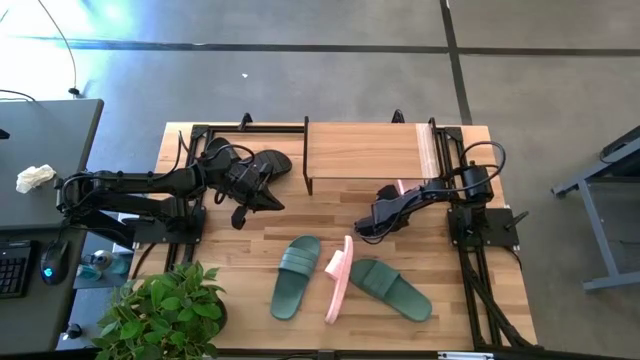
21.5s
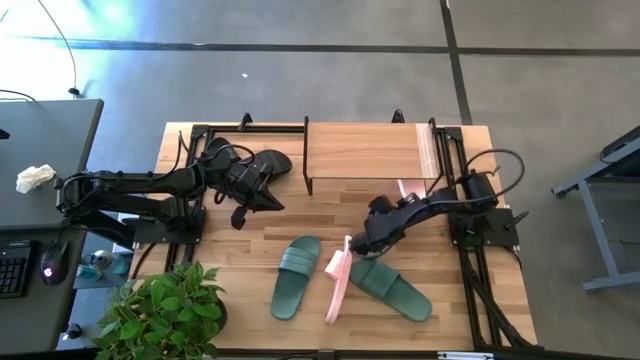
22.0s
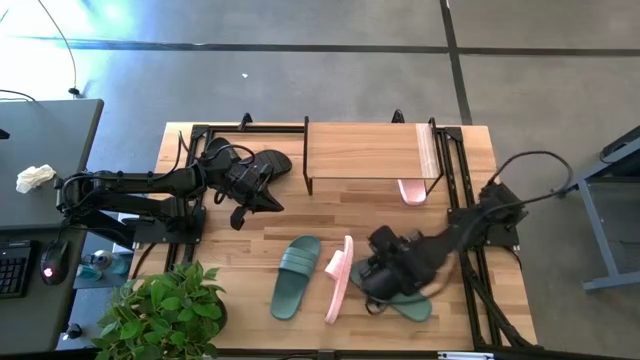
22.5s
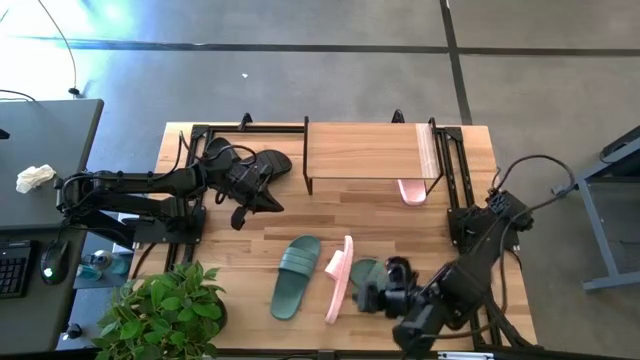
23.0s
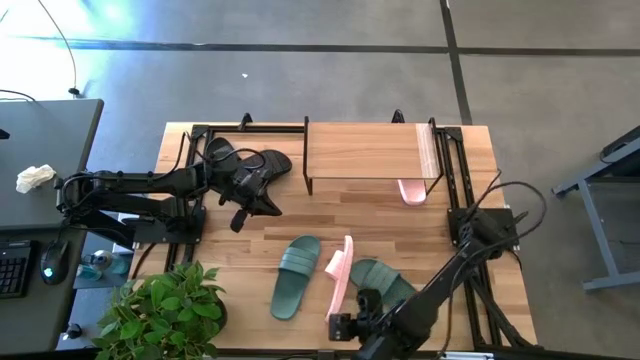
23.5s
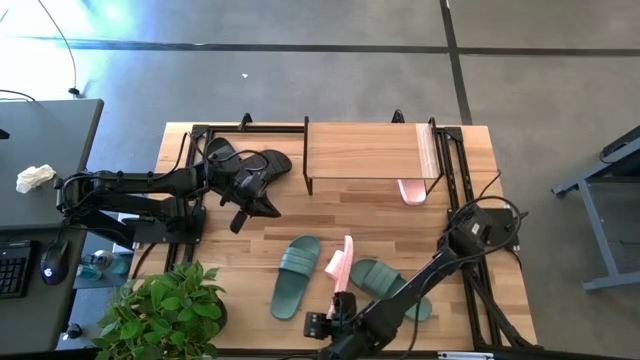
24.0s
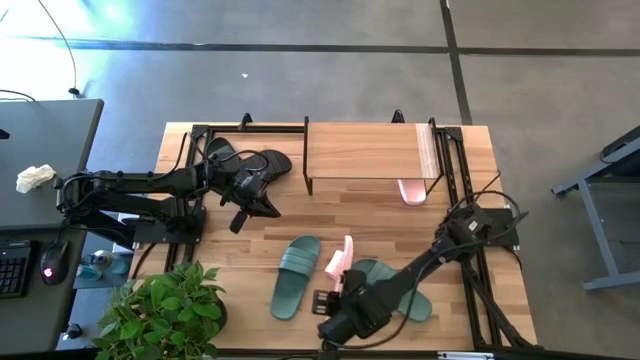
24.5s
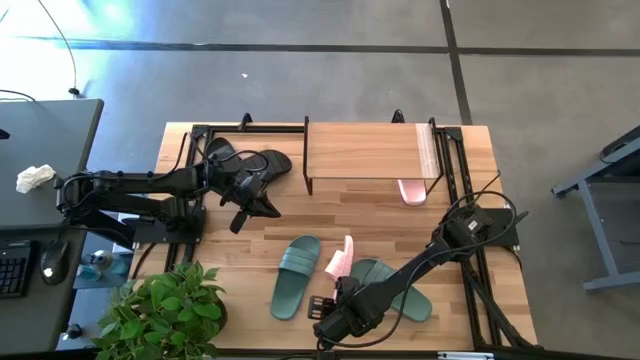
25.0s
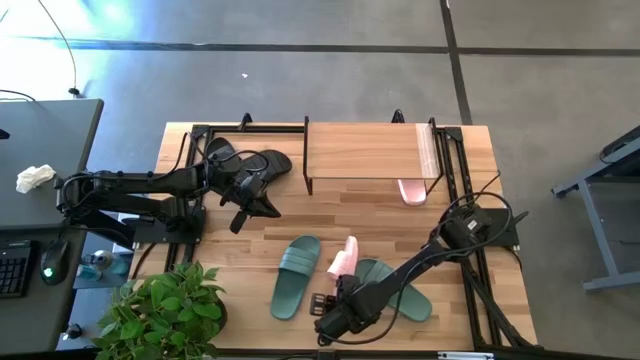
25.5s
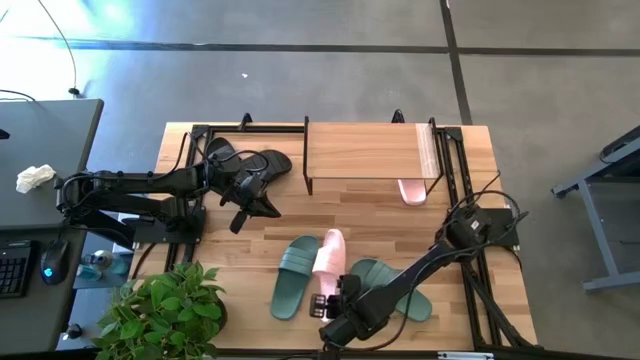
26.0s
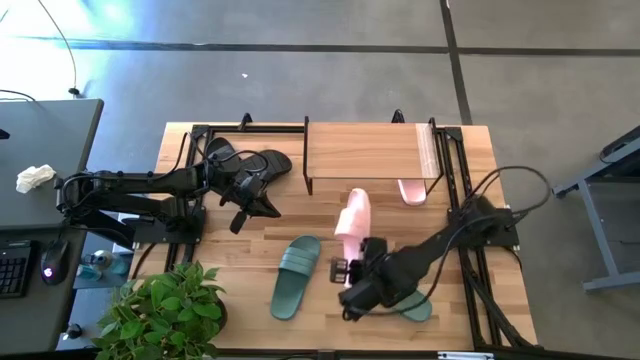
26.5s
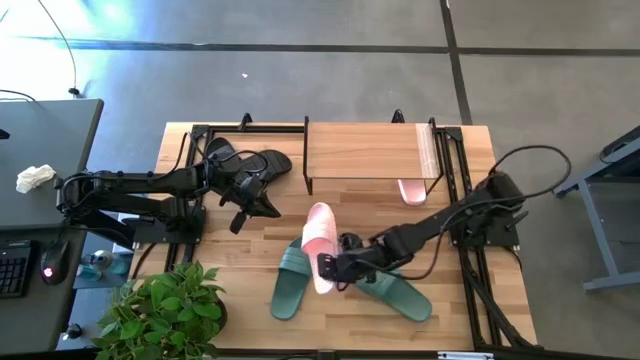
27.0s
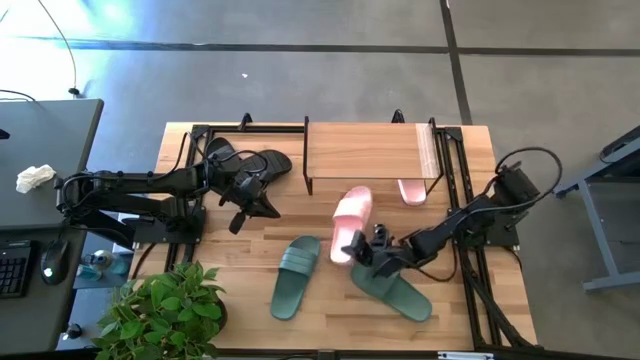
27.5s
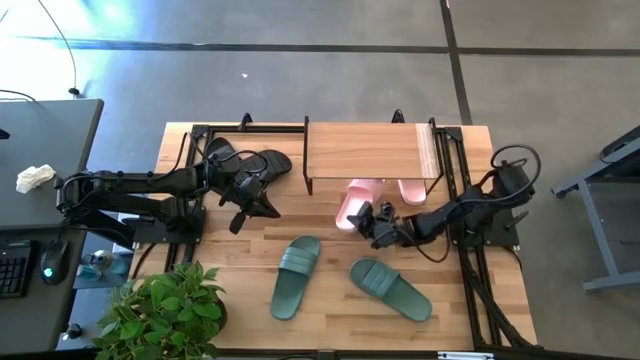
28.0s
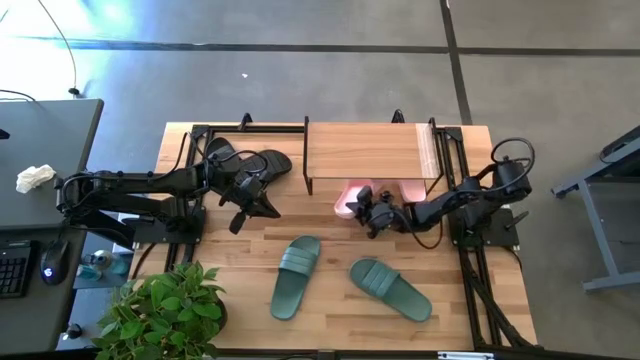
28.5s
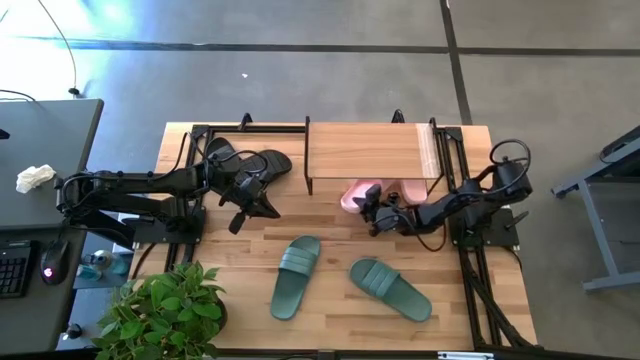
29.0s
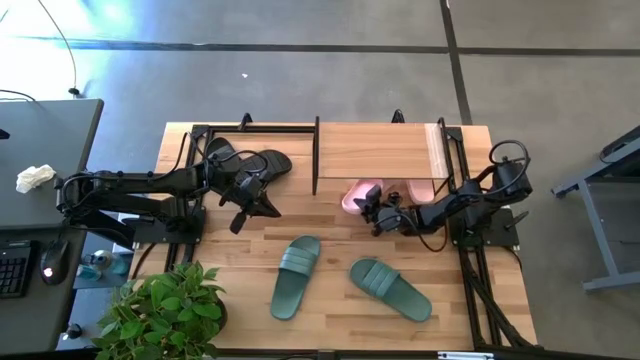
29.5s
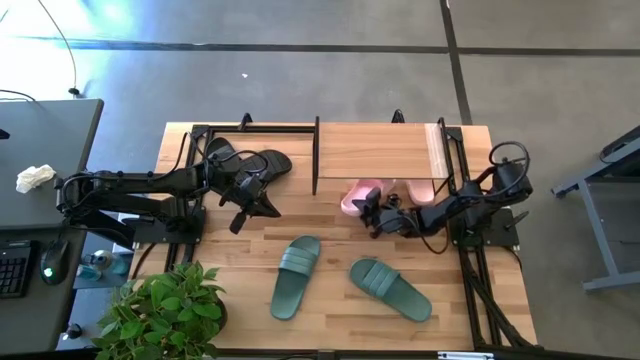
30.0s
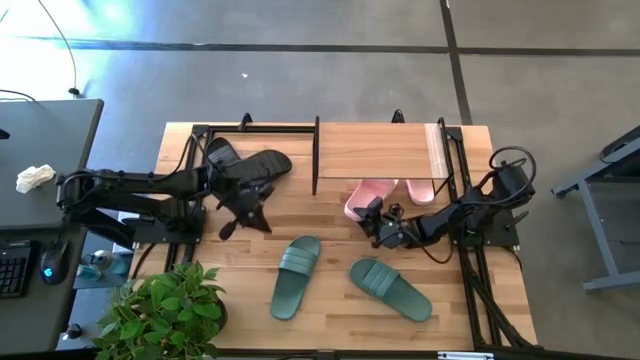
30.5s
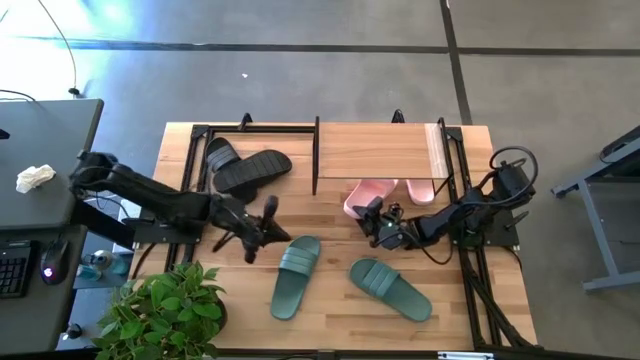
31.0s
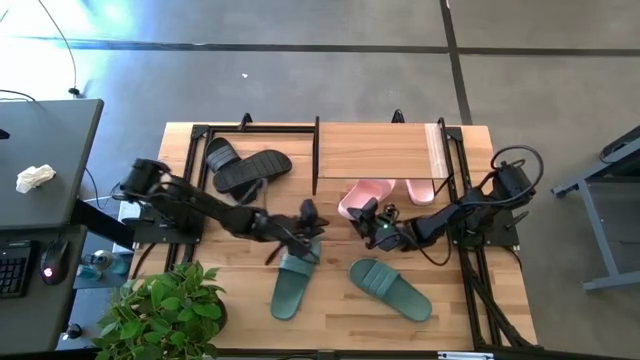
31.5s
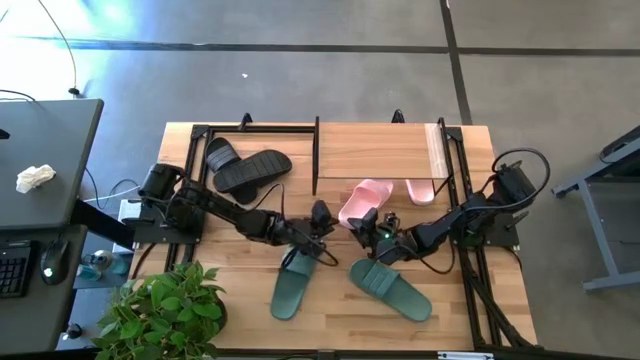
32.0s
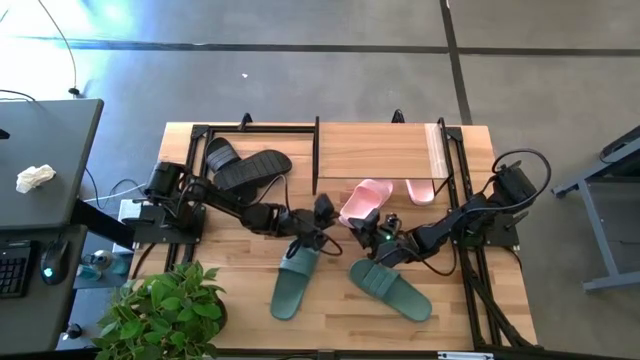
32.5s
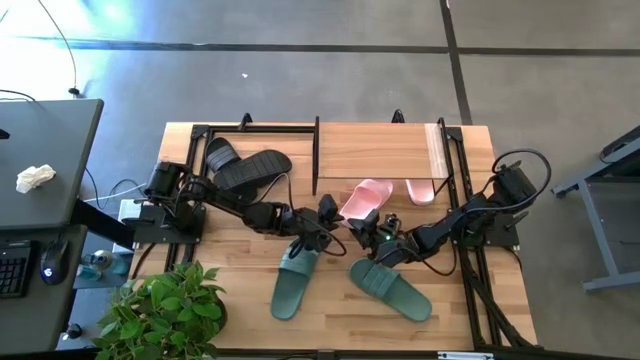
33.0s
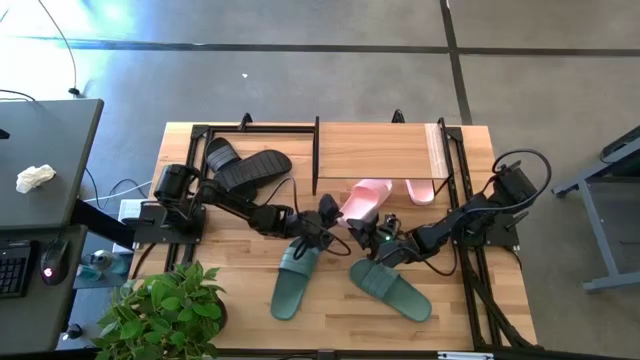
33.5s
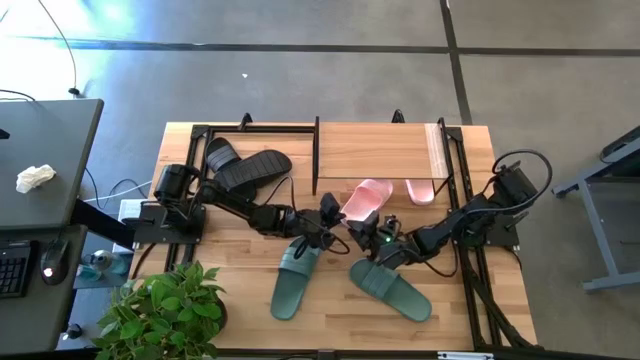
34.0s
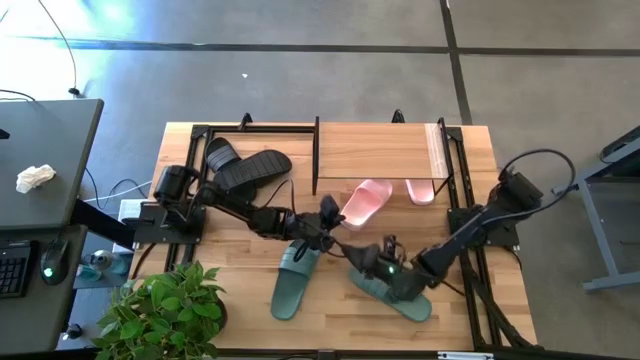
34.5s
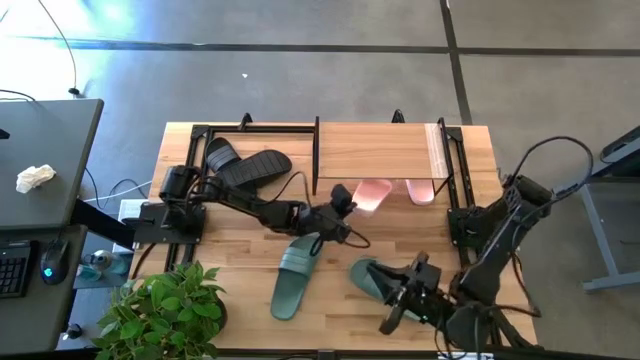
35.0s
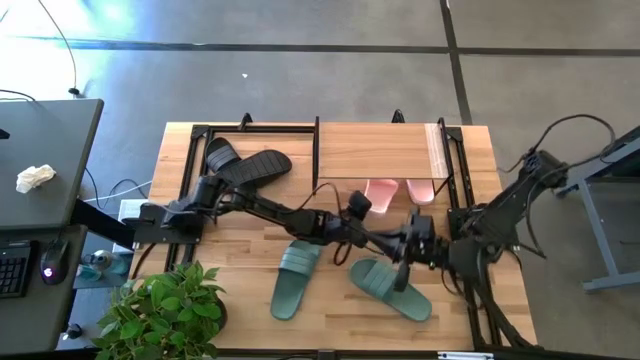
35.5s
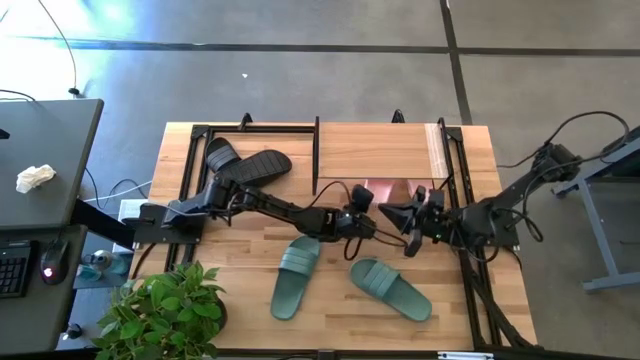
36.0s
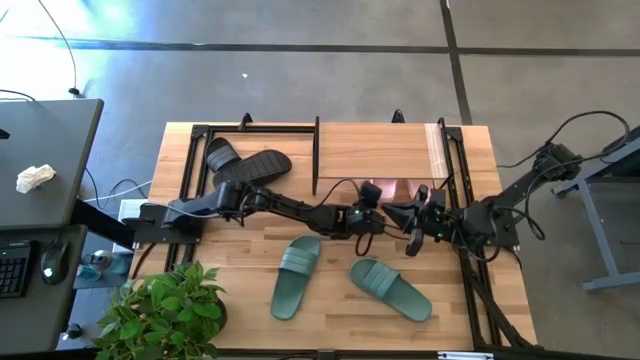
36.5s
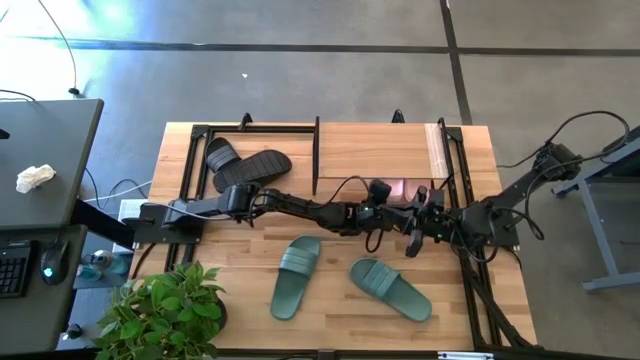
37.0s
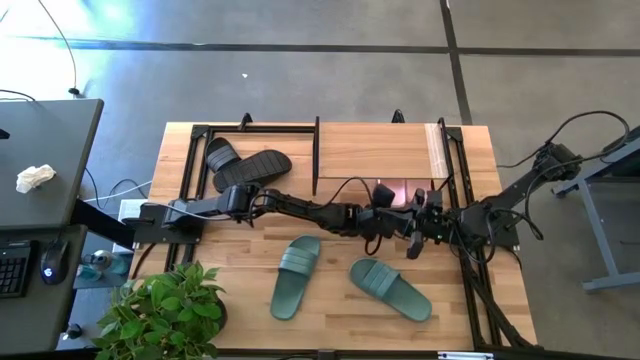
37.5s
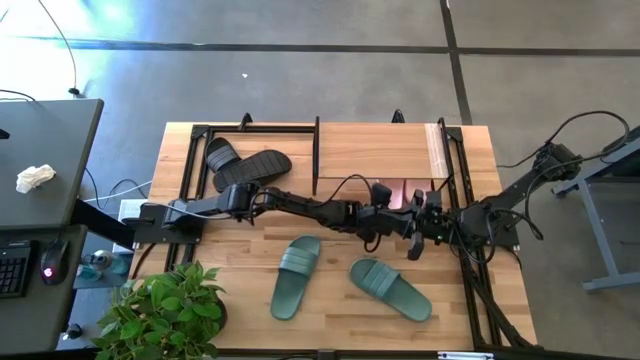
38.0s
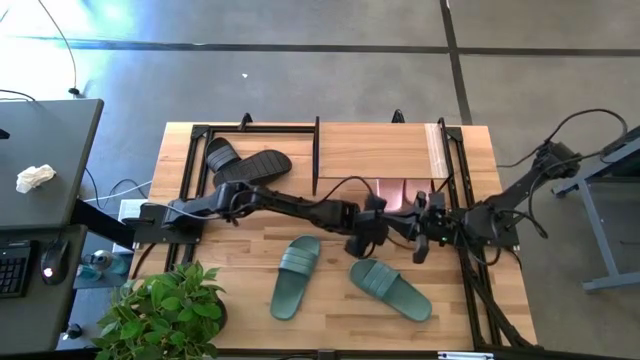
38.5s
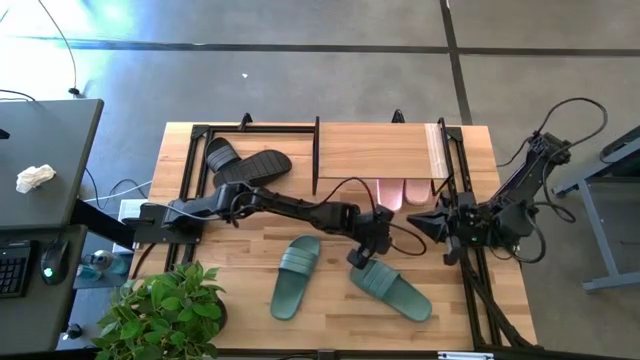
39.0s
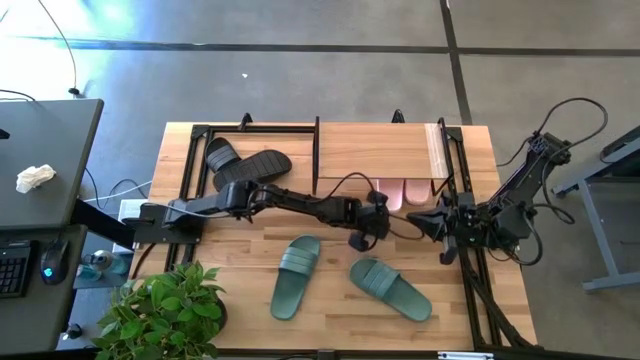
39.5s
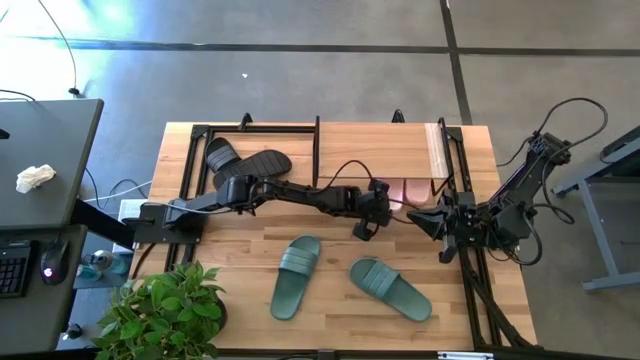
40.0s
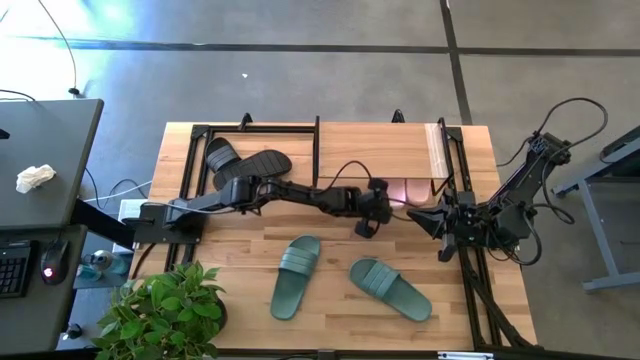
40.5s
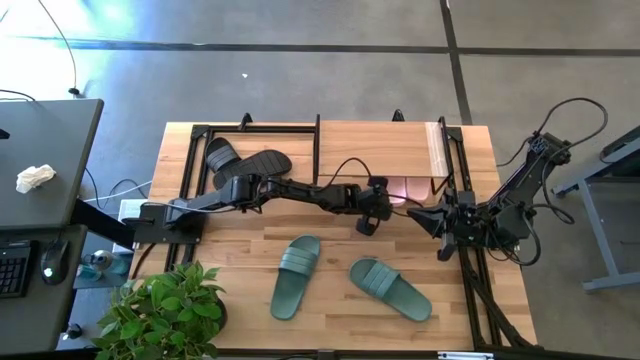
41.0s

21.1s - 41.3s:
Task: Pick and place slides into the shelf
Put the pink slide under the shelf
